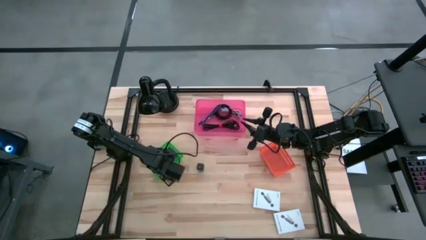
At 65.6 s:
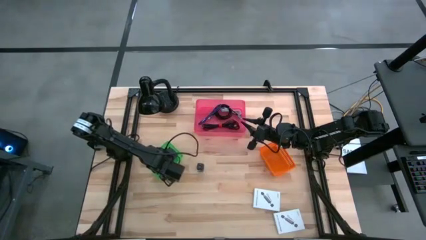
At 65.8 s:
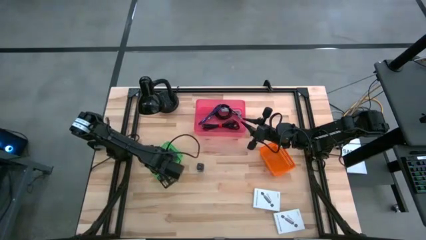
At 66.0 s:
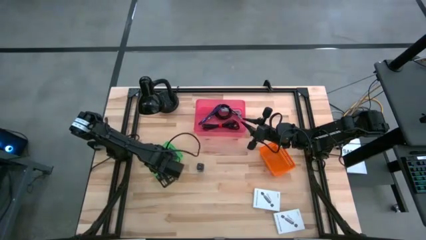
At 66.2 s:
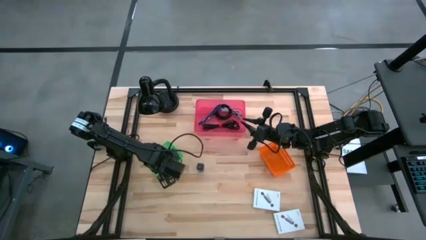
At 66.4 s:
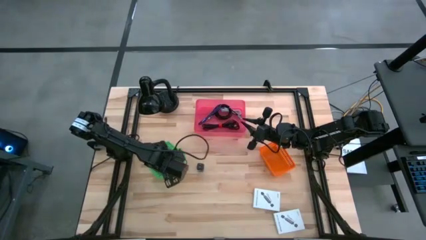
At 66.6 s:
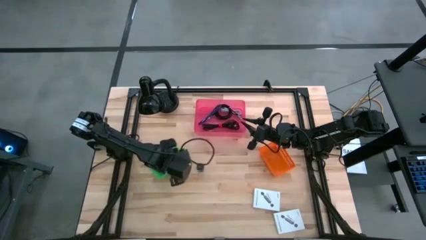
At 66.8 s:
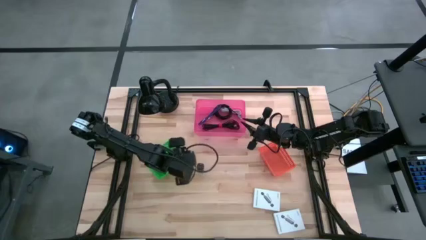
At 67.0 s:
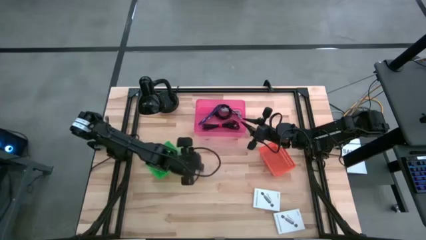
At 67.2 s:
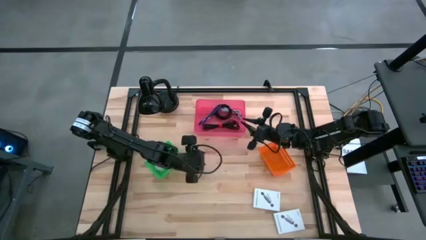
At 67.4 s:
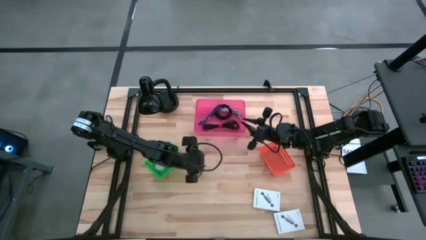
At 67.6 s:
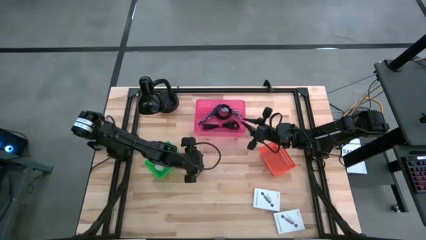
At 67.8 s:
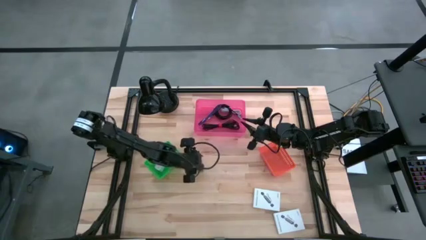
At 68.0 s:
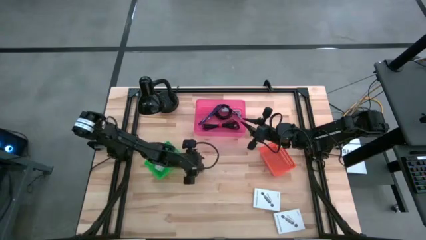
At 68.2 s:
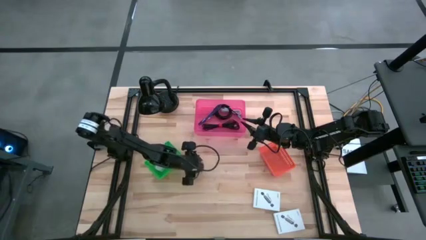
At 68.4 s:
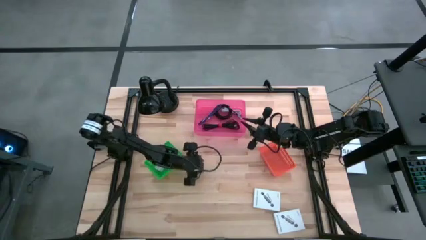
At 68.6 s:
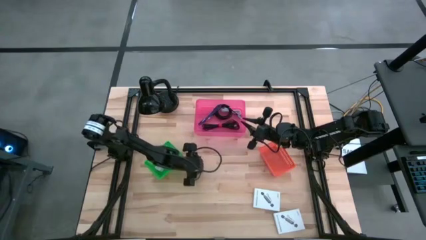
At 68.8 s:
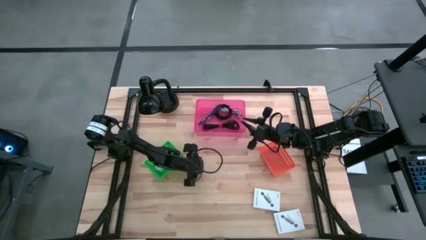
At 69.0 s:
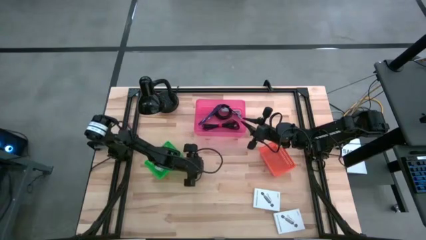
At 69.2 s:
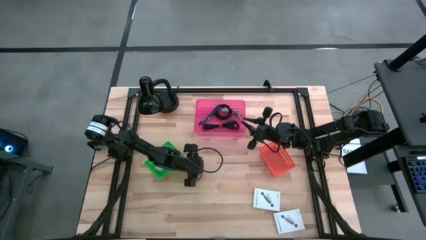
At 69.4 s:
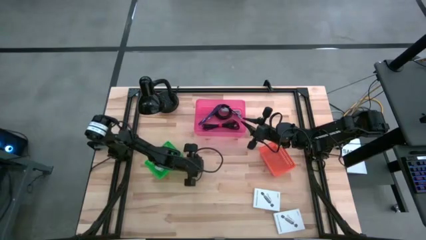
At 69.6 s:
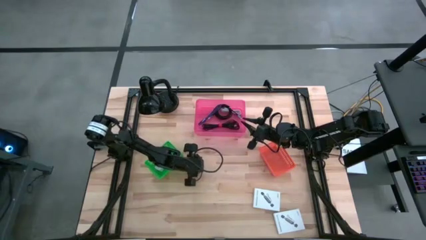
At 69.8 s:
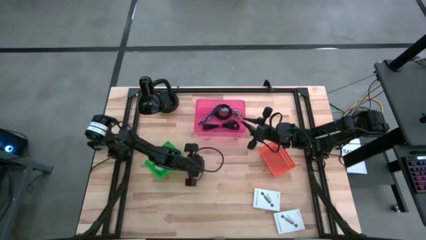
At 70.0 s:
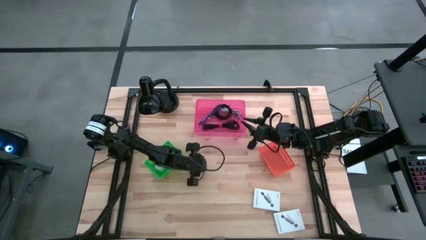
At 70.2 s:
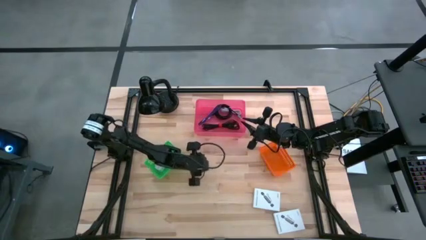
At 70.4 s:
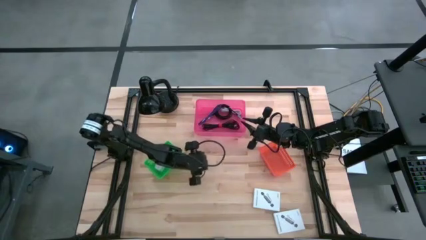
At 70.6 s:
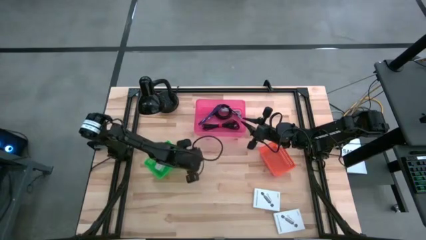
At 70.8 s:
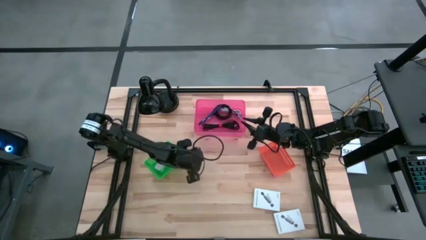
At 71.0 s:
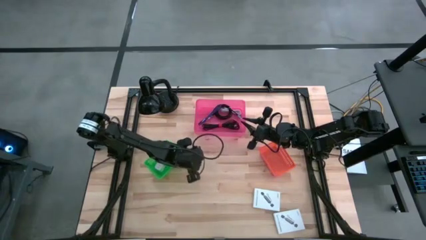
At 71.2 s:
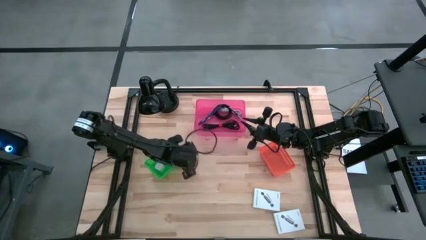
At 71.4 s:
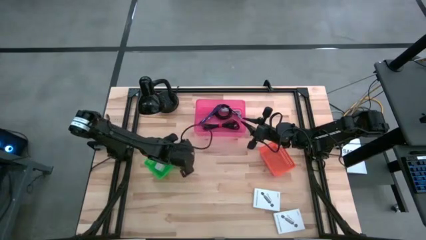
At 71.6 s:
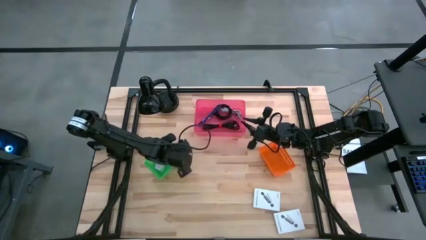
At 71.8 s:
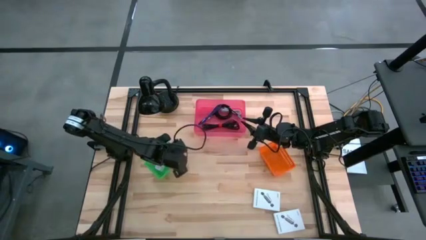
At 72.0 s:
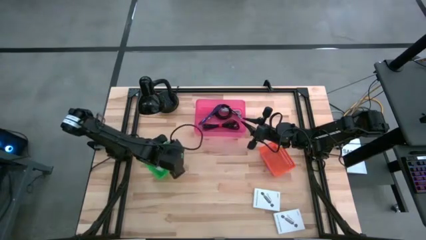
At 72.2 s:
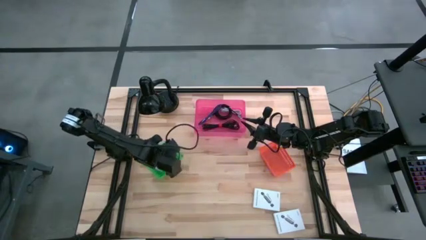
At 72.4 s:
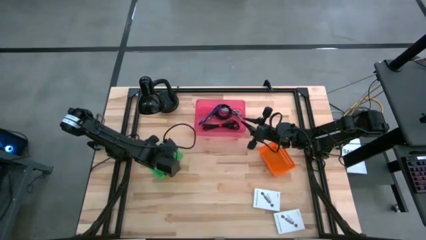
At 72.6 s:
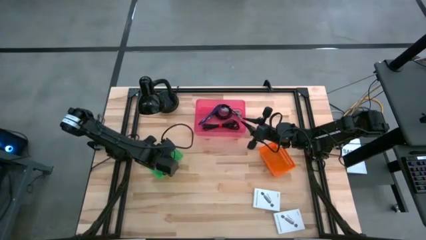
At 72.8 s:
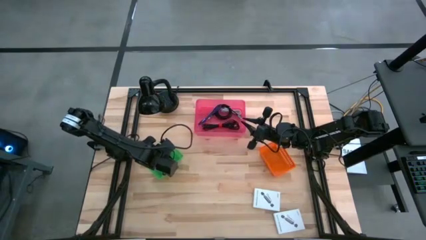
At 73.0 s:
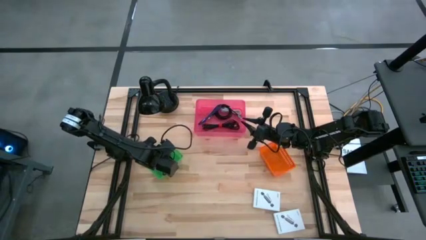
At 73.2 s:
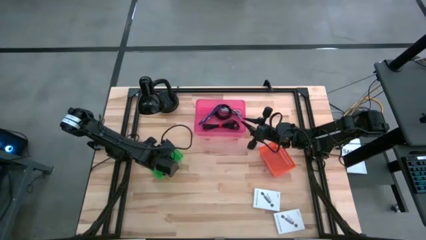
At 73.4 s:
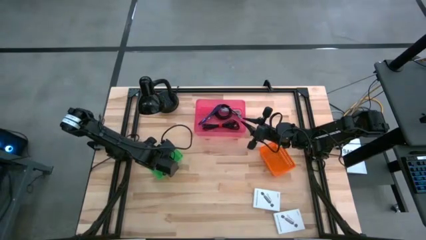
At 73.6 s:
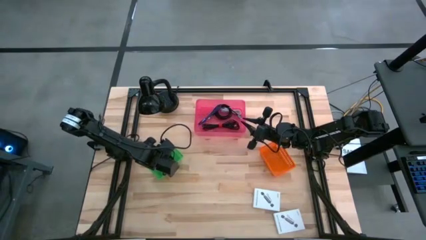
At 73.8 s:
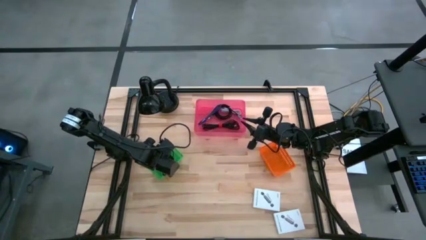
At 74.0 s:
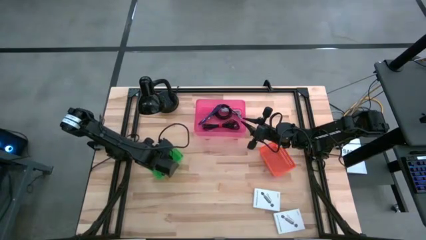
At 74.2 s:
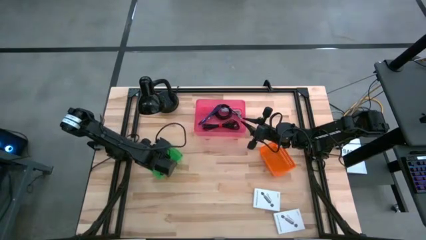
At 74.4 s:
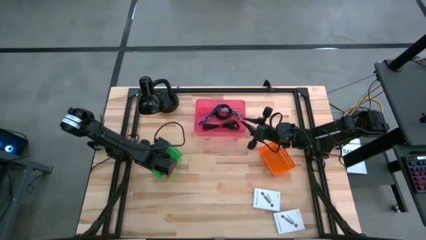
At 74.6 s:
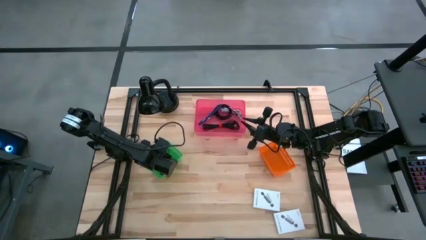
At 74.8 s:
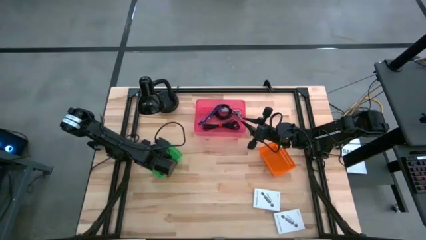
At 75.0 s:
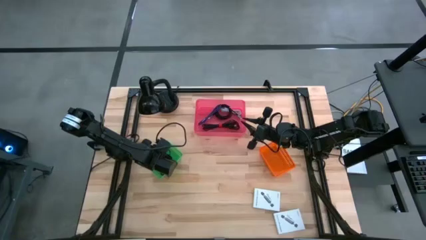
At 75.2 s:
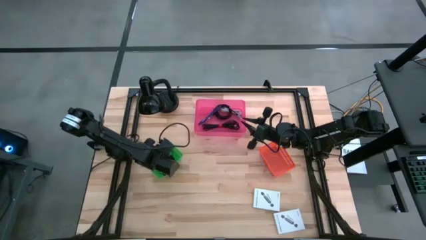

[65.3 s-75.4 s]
Task: Pick and place items into bin
Put the black charger adapter into the green bin
